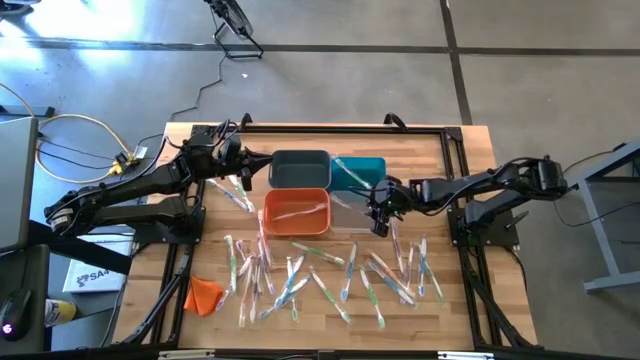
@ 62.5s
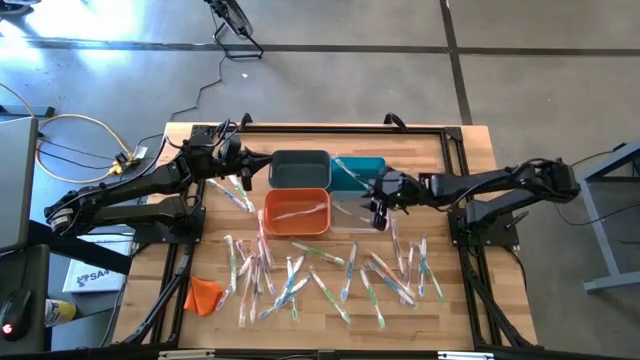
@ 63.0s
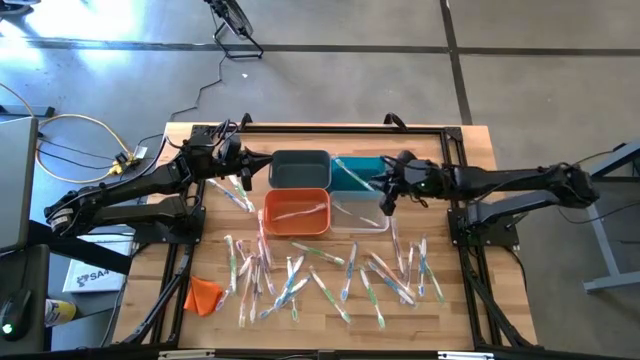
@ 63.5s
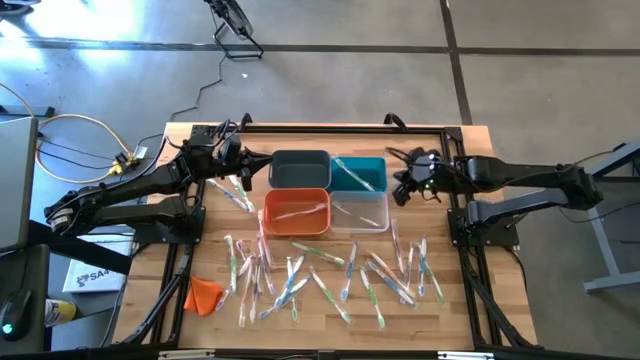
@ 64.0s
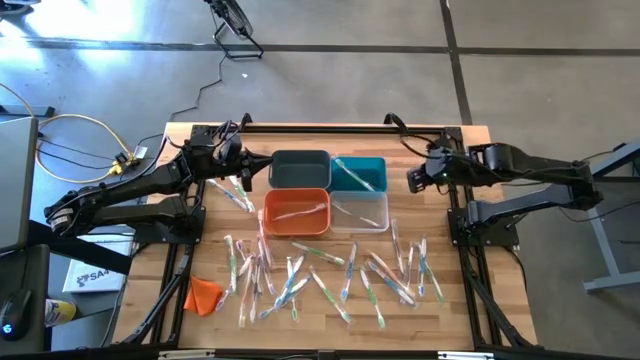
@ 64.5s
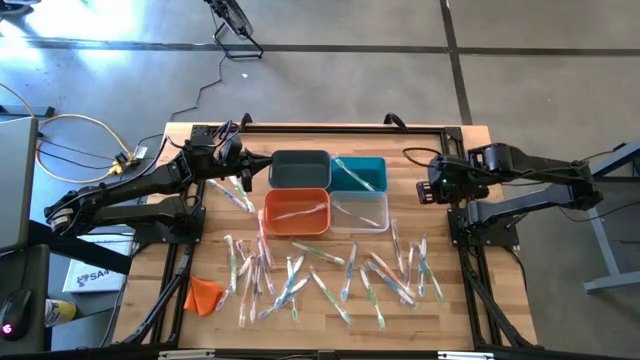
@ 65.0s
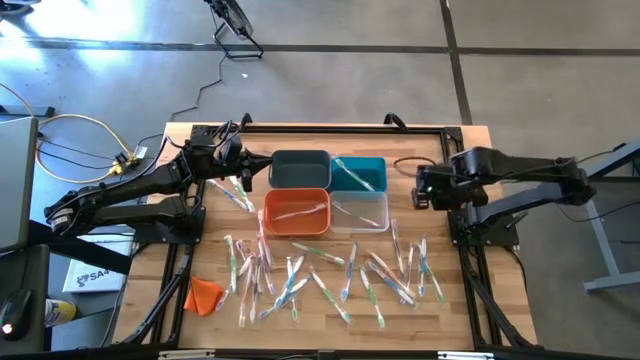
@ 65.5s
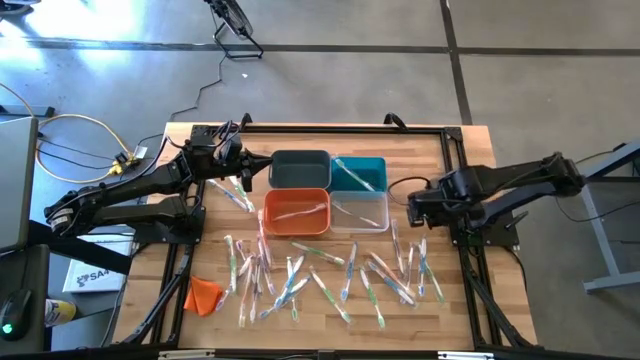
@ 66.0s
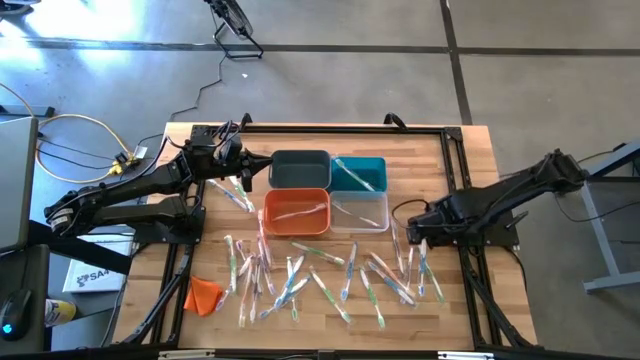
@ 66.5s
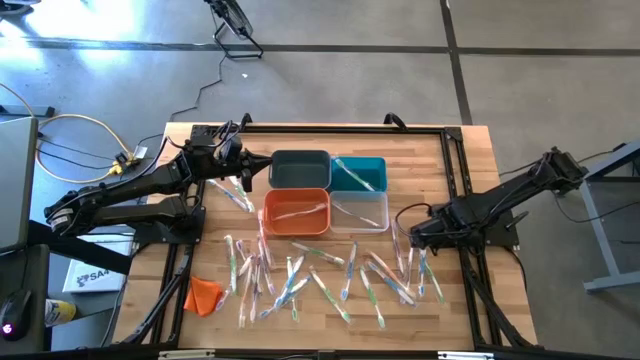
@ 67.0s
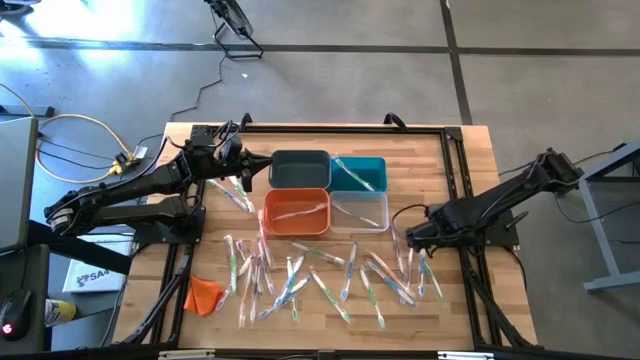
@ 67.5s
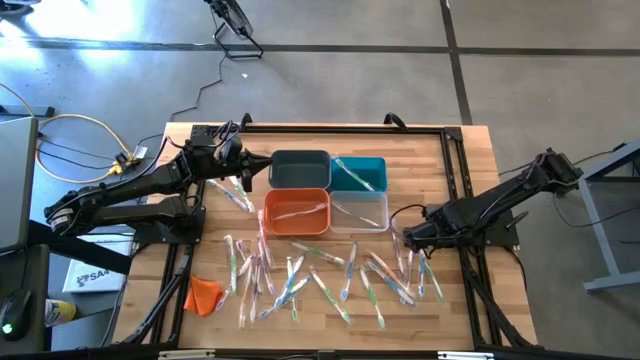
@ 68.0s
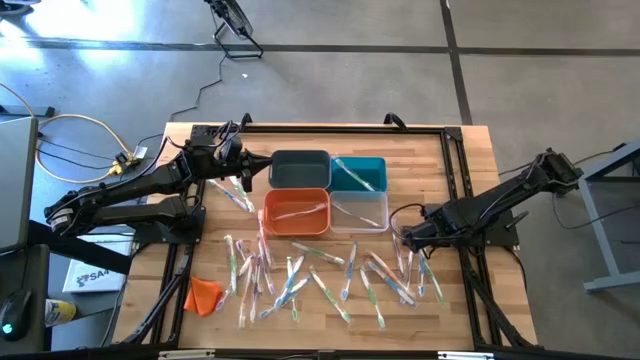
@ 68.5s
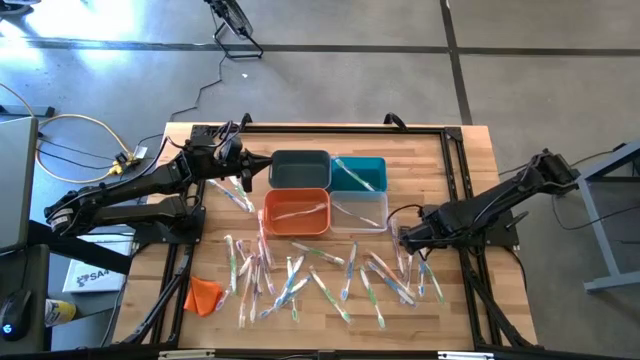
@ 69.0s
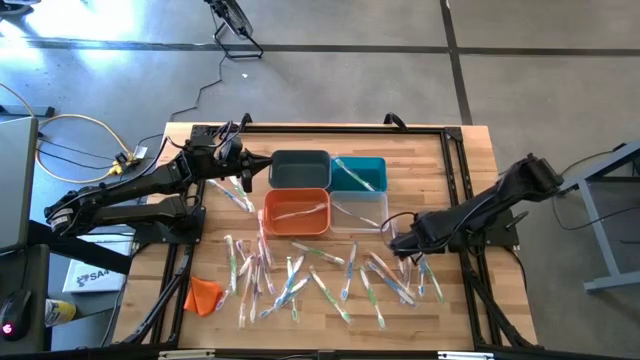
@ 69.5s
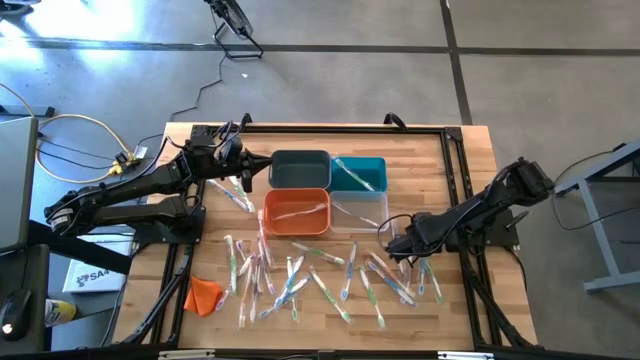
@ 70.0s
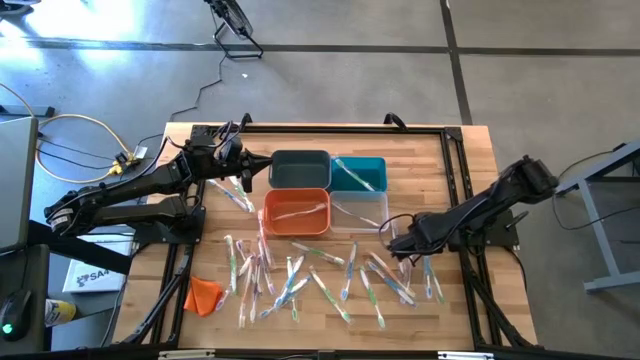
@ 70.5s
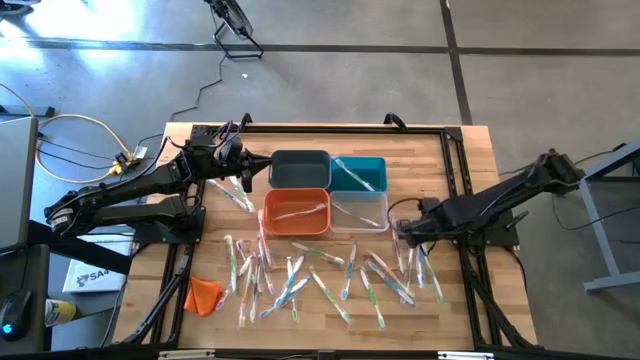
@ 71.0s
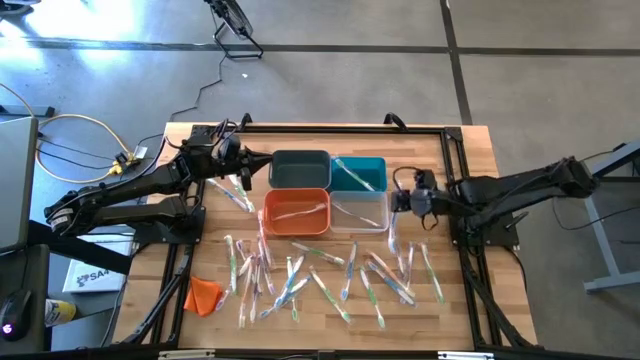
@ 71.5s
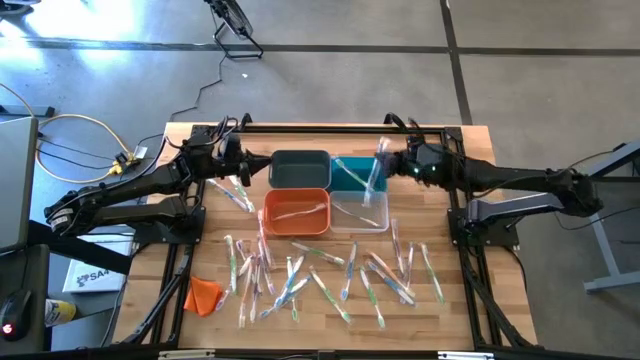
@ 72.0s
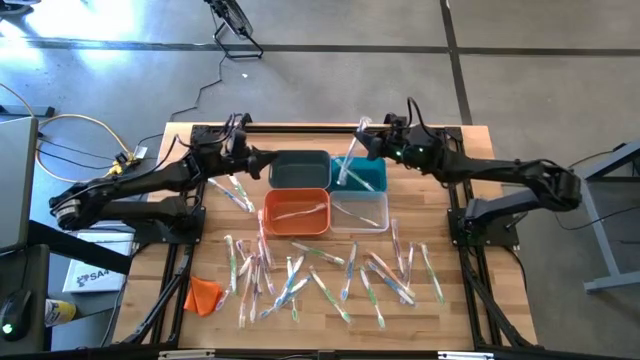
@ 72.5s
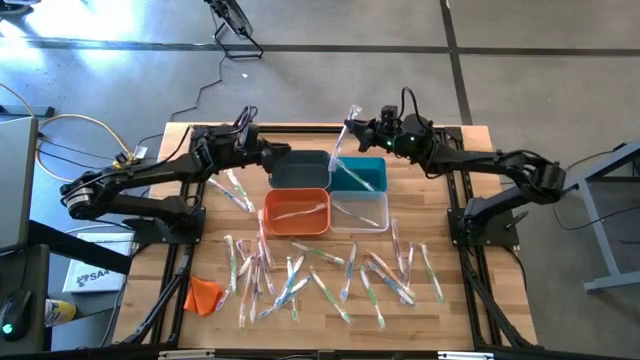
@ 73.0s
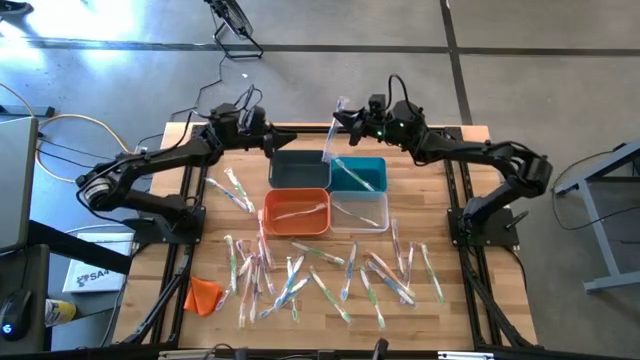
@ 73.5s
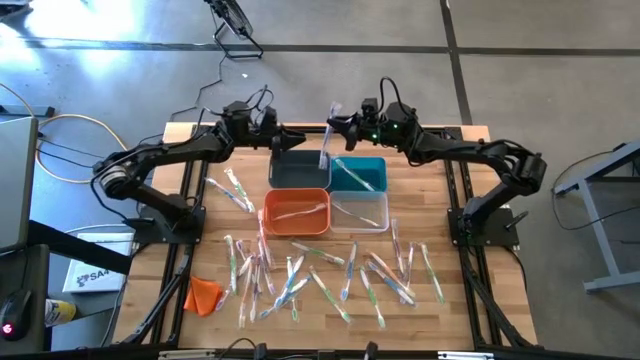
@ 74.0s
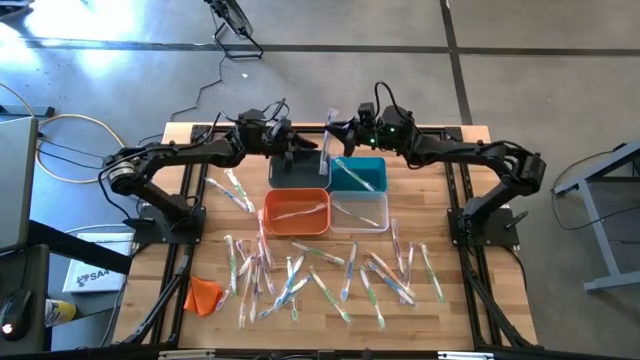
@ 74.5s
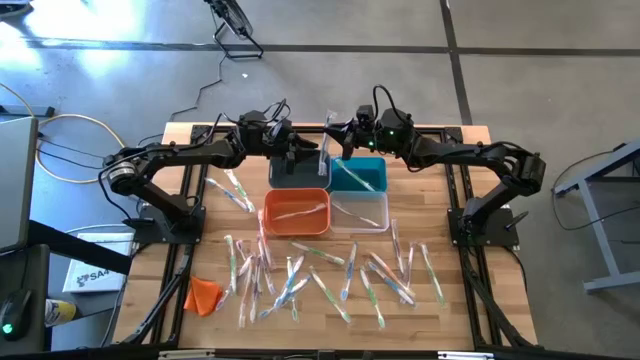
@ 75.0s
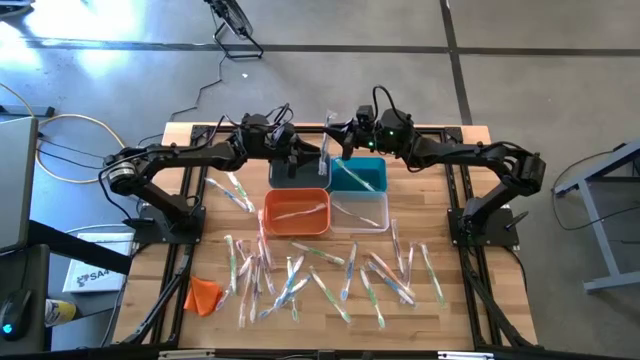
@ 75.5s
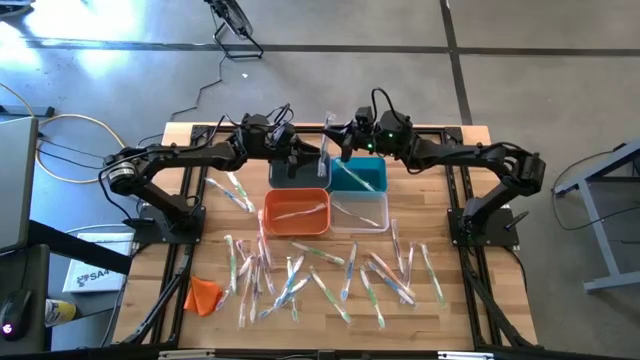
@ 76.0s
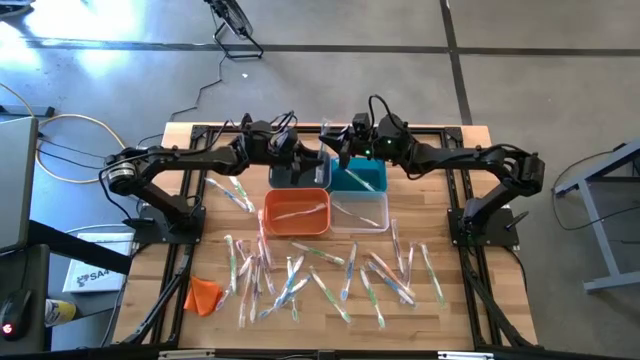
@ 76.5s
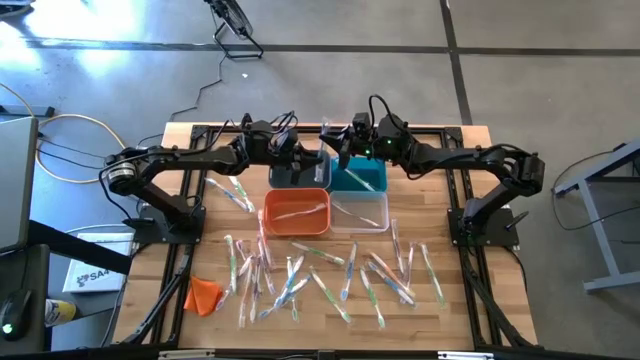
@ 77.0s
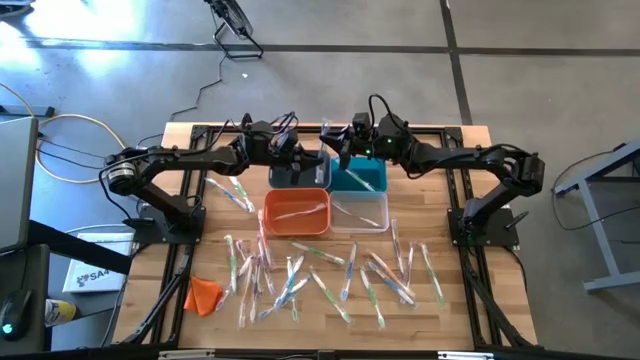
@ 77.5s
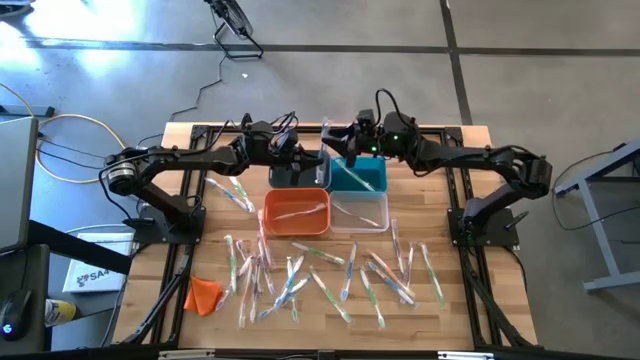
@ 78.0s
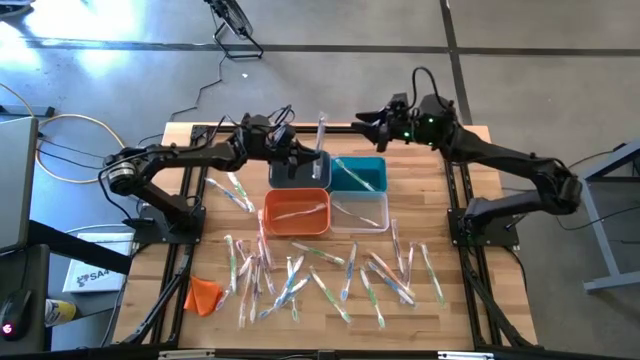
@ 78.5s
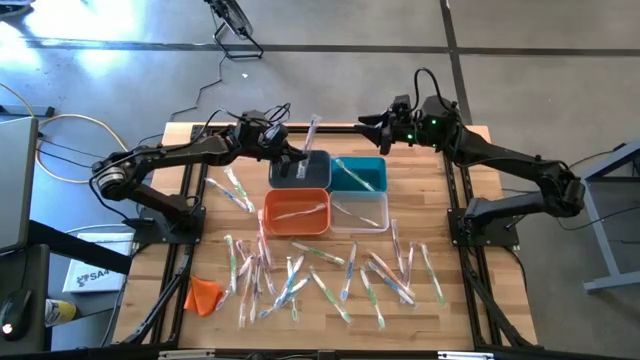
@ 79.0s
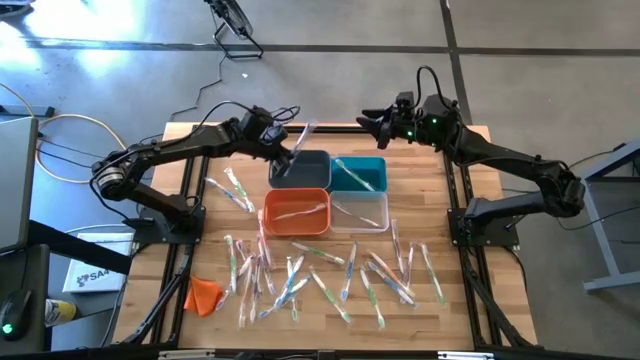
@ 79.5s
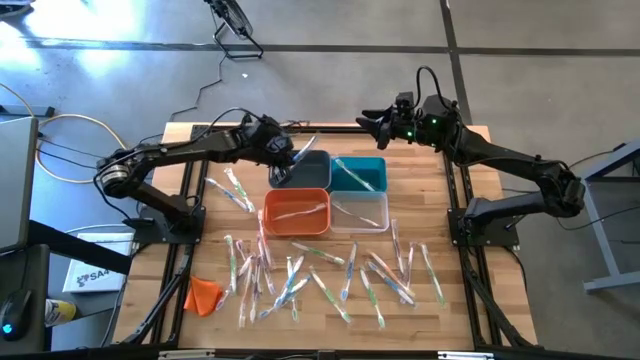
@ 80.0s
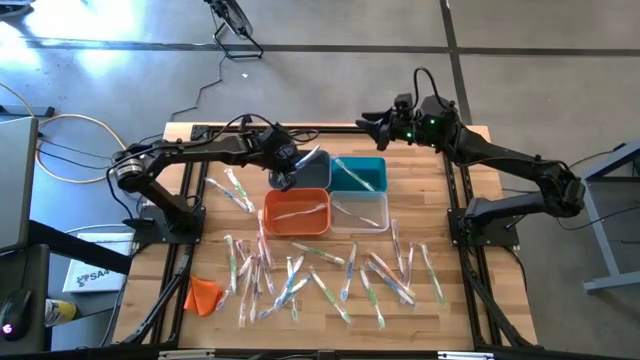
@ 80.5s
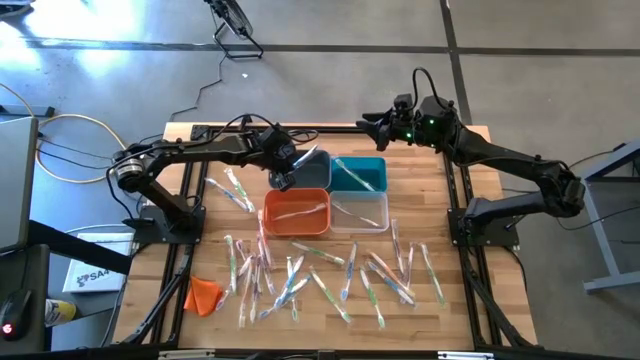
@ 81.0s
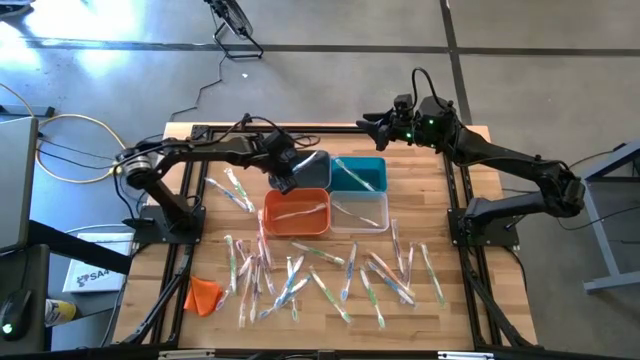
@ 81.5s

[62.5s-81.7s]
Task: Pick & Place Toothbrushes
Put the blue toothbrush into the left blue bin

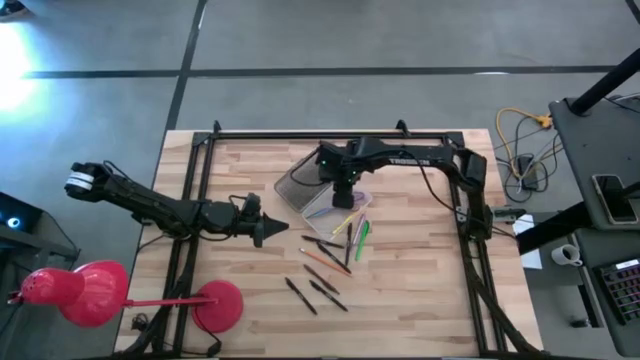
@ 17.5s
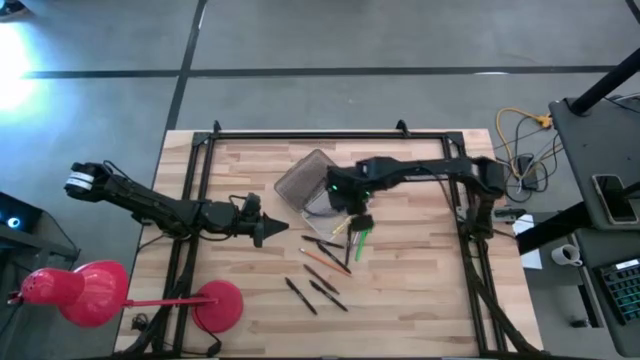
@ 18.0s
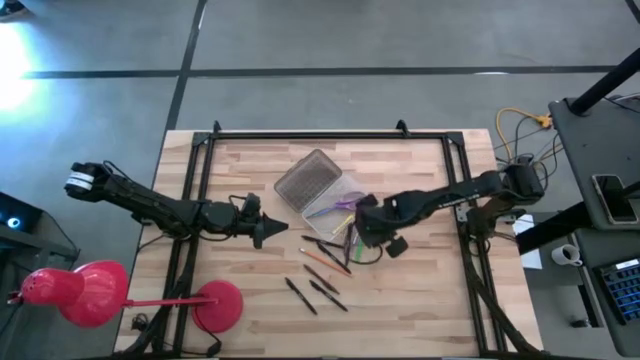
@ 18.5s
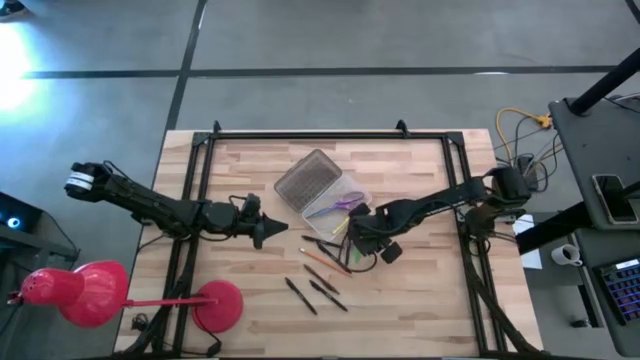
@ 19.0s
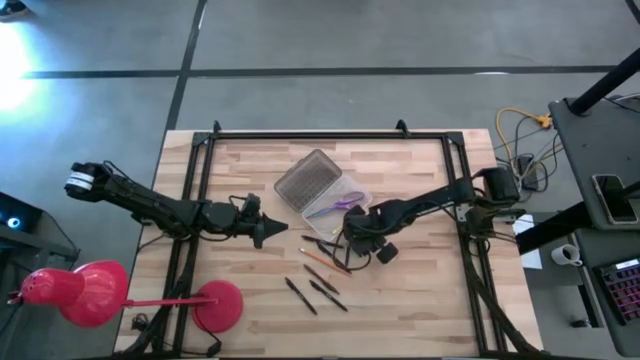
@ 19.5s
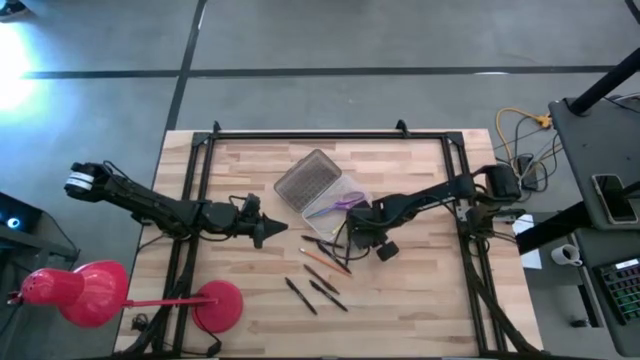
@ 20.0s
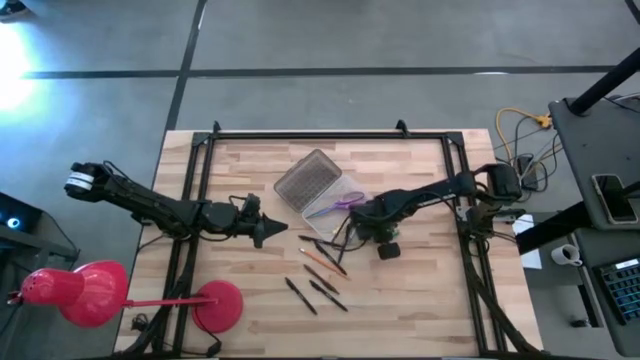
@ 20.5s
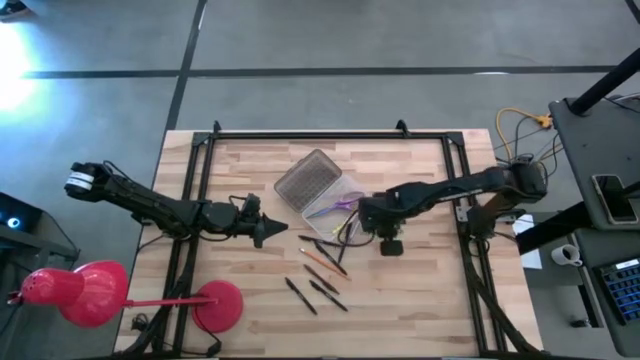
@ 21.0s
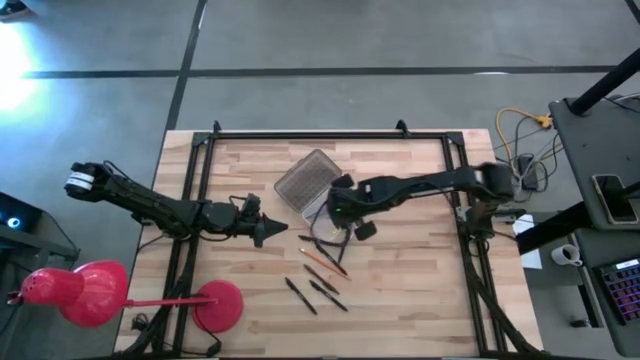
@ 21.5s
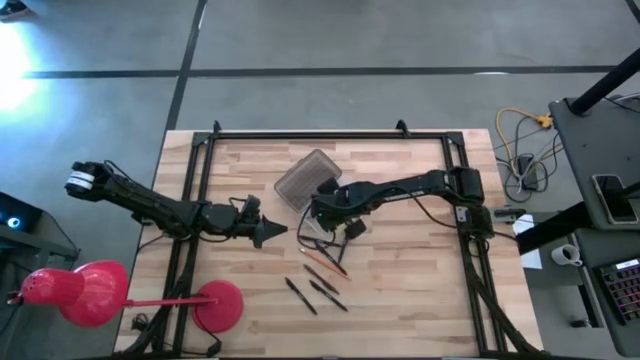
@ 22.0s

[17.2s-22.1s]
Task: Pick & place school supplies into a supply box
Put the green pen into the supply box
